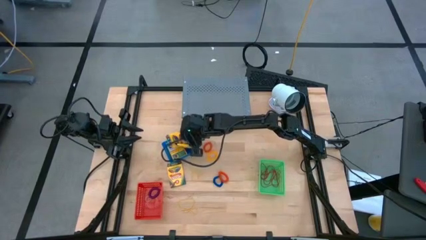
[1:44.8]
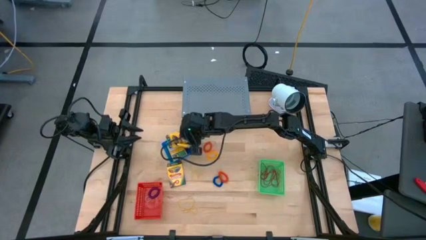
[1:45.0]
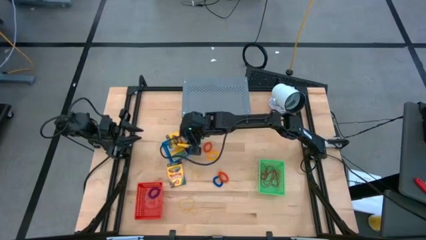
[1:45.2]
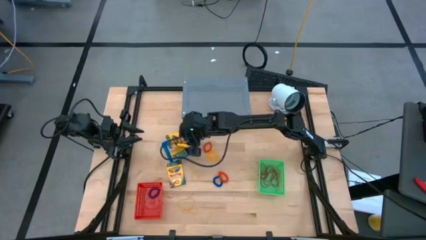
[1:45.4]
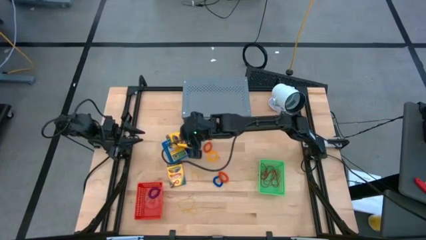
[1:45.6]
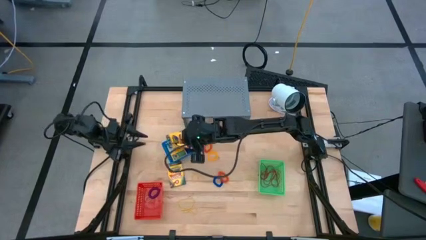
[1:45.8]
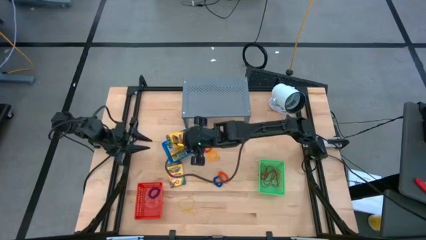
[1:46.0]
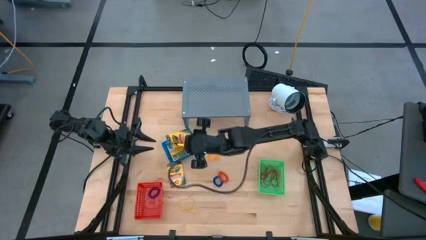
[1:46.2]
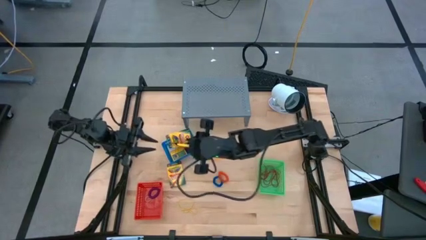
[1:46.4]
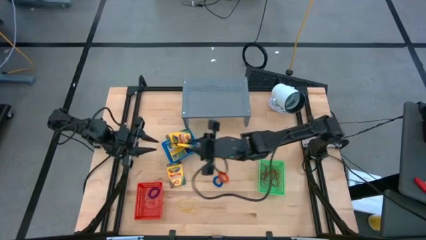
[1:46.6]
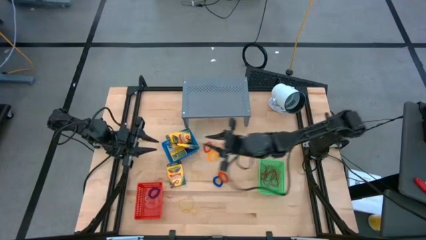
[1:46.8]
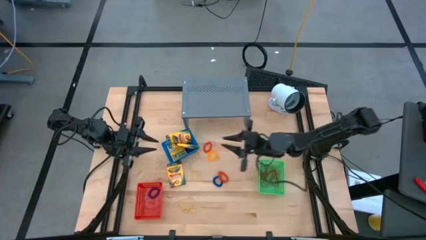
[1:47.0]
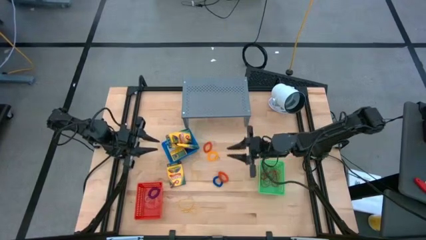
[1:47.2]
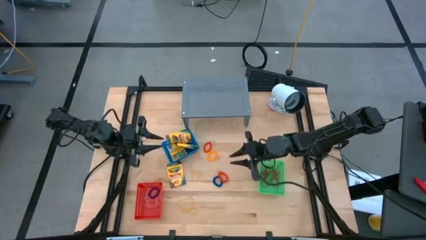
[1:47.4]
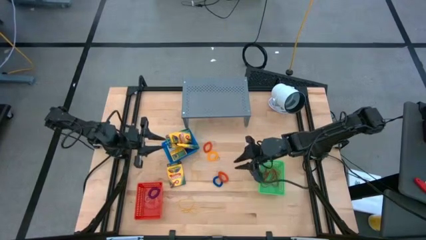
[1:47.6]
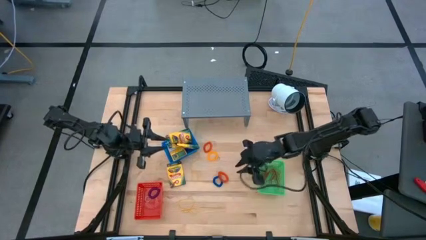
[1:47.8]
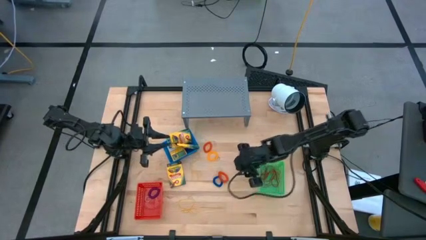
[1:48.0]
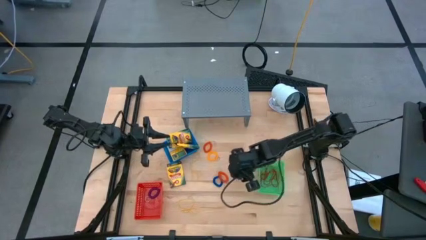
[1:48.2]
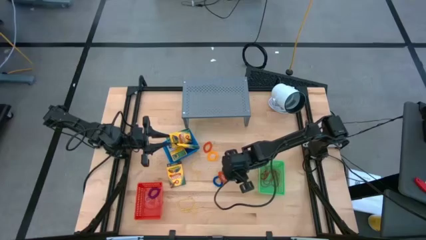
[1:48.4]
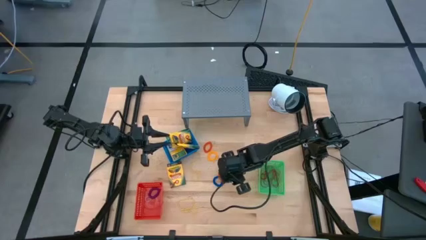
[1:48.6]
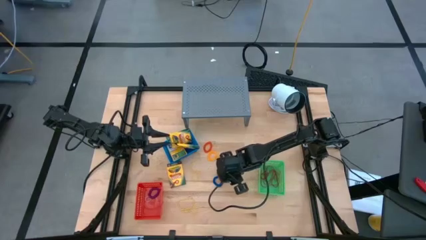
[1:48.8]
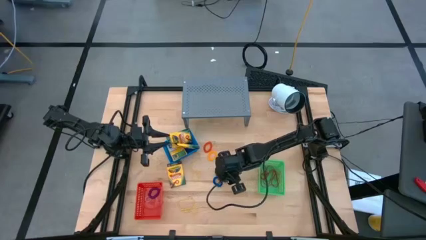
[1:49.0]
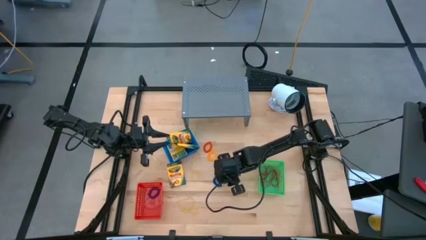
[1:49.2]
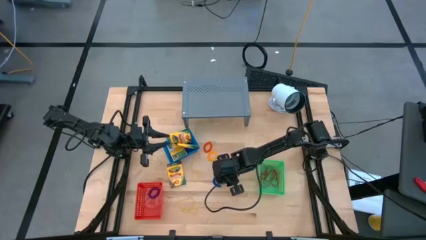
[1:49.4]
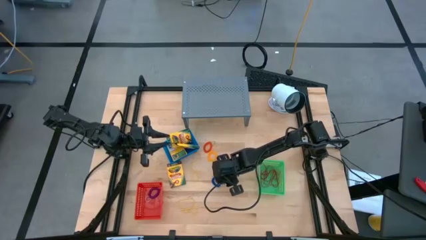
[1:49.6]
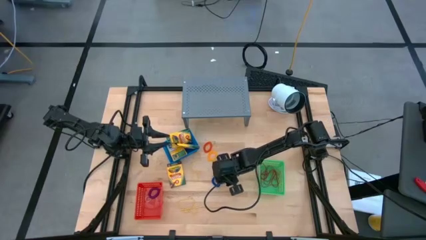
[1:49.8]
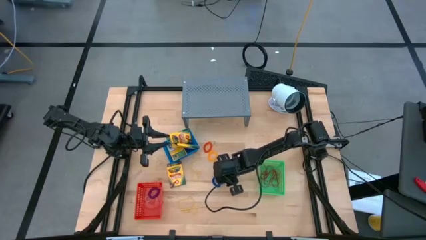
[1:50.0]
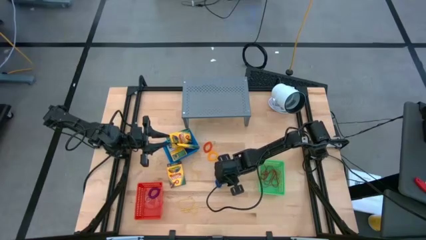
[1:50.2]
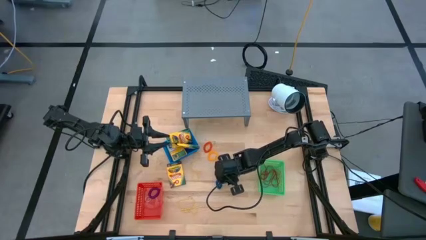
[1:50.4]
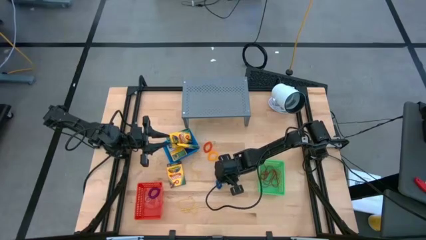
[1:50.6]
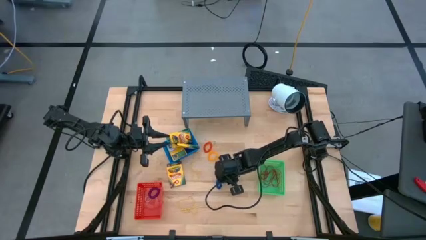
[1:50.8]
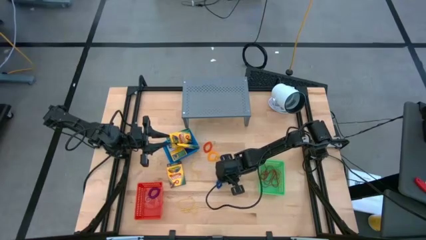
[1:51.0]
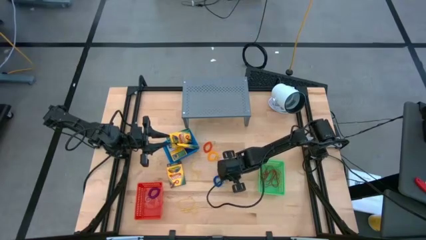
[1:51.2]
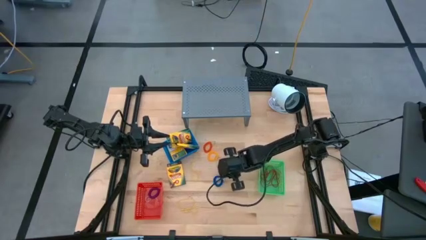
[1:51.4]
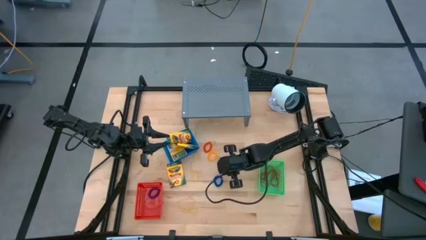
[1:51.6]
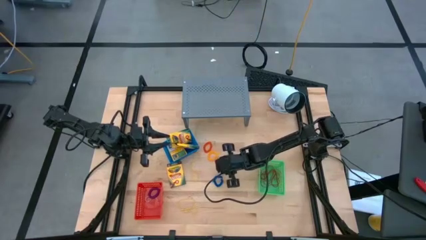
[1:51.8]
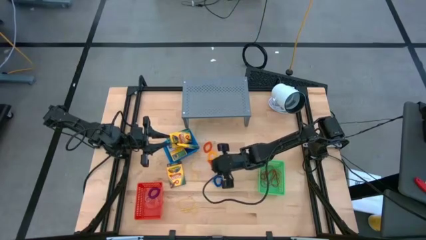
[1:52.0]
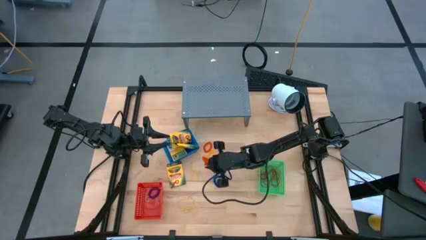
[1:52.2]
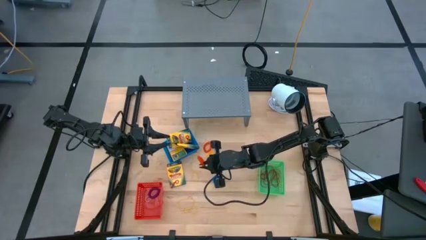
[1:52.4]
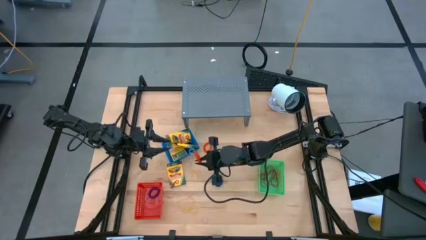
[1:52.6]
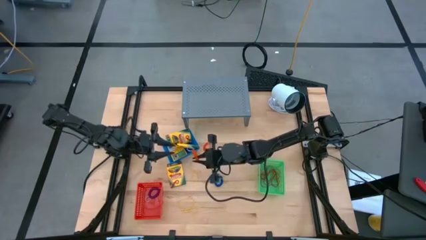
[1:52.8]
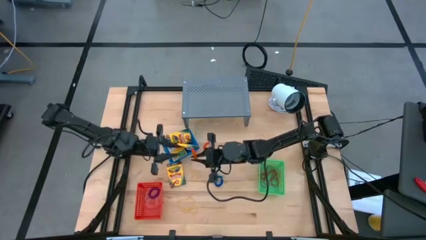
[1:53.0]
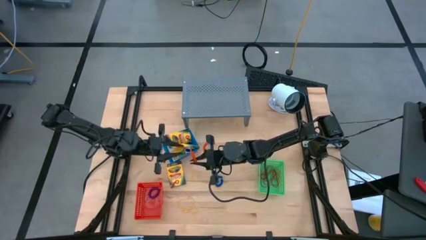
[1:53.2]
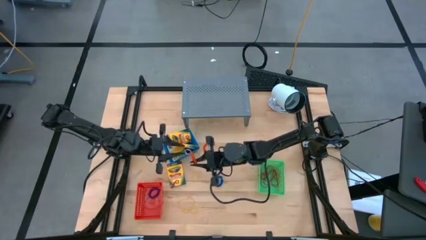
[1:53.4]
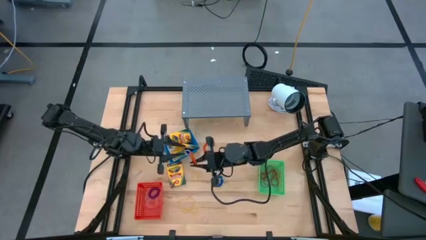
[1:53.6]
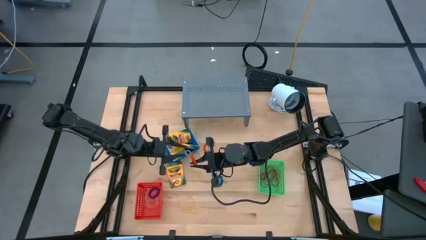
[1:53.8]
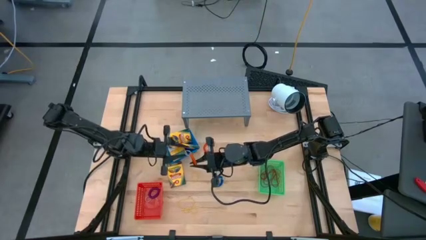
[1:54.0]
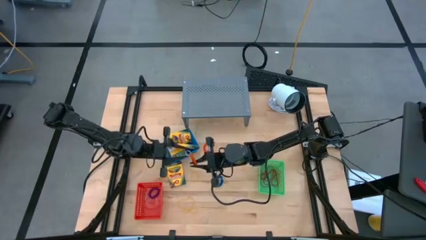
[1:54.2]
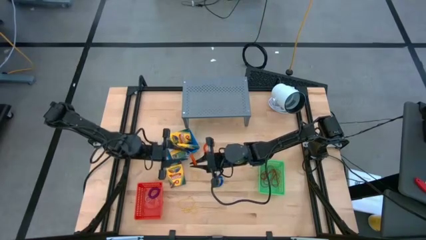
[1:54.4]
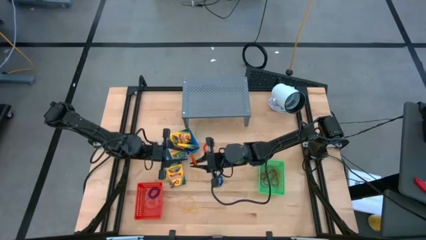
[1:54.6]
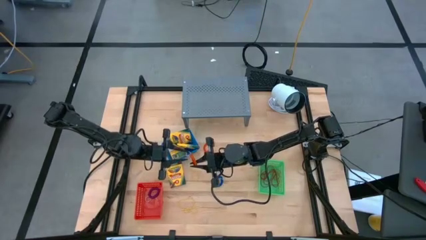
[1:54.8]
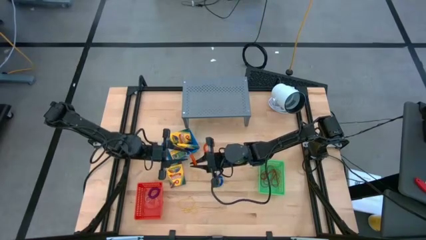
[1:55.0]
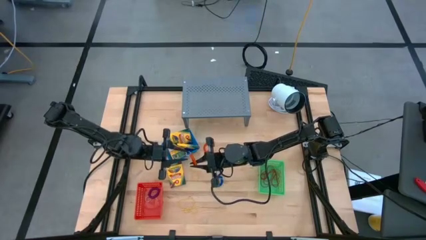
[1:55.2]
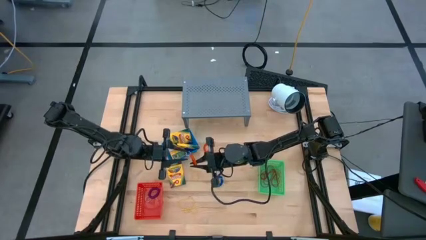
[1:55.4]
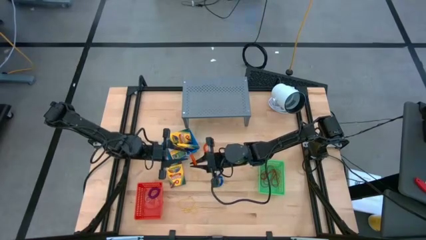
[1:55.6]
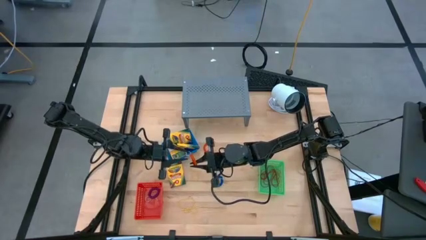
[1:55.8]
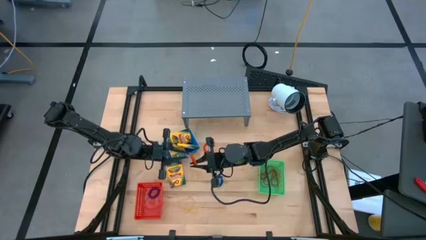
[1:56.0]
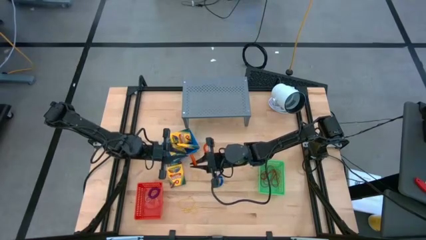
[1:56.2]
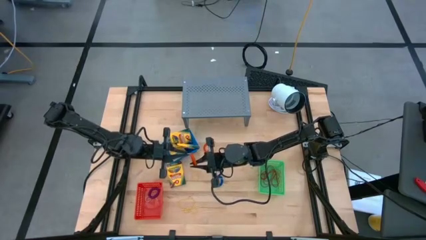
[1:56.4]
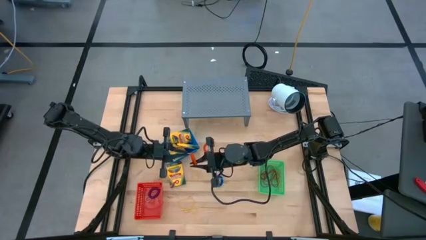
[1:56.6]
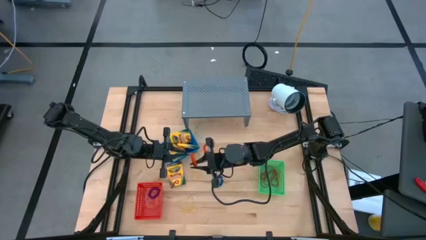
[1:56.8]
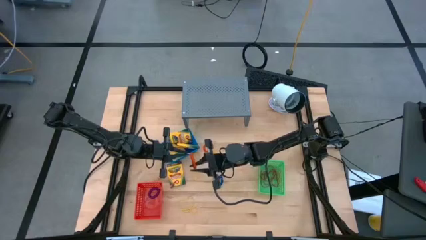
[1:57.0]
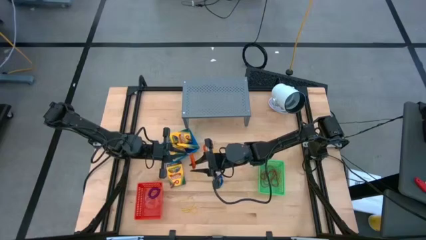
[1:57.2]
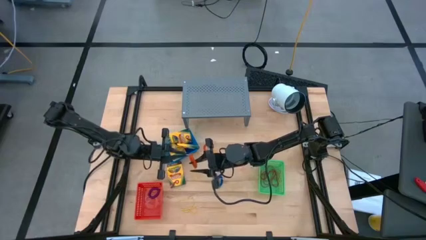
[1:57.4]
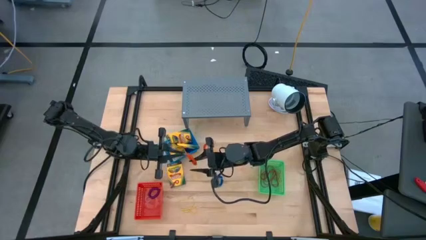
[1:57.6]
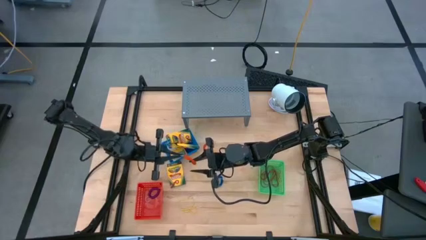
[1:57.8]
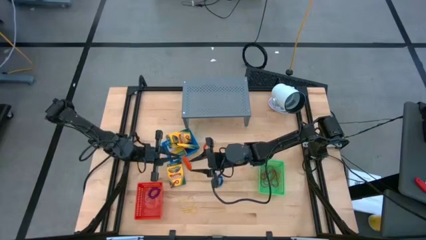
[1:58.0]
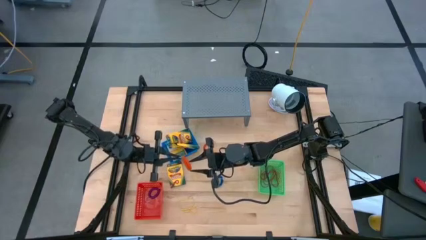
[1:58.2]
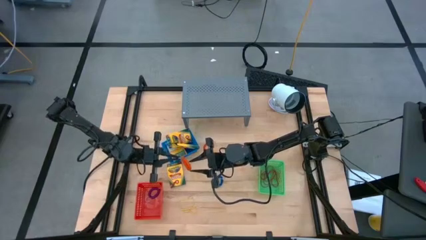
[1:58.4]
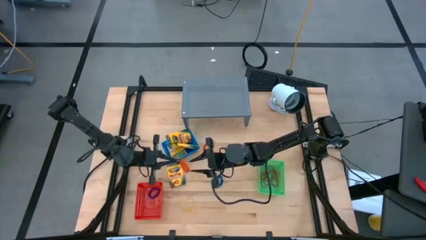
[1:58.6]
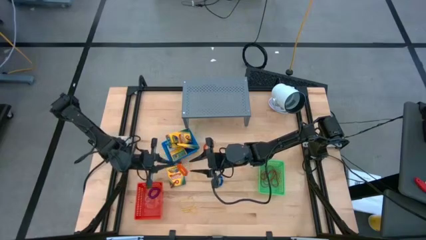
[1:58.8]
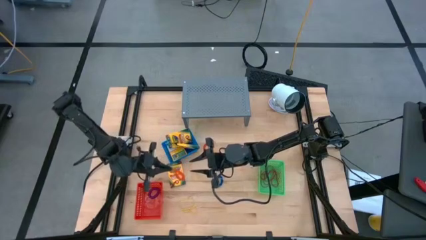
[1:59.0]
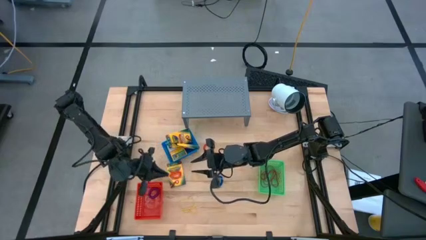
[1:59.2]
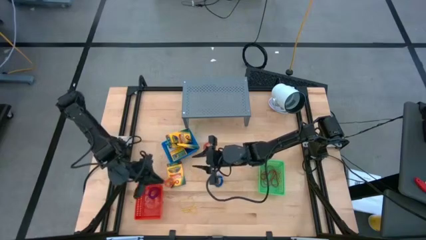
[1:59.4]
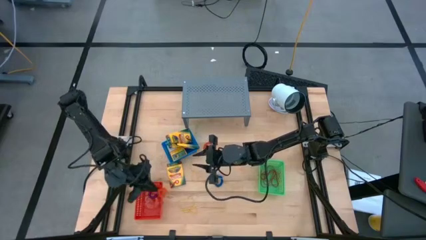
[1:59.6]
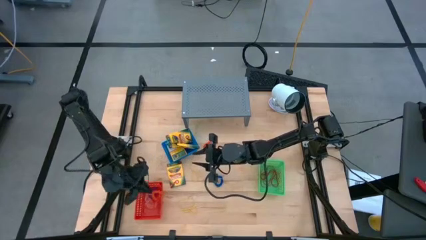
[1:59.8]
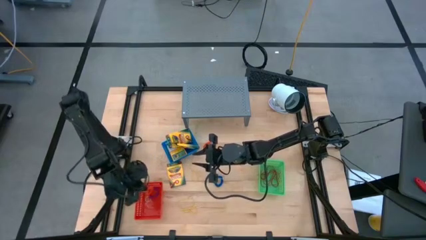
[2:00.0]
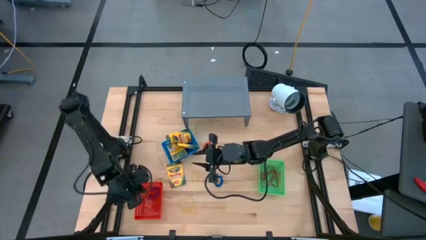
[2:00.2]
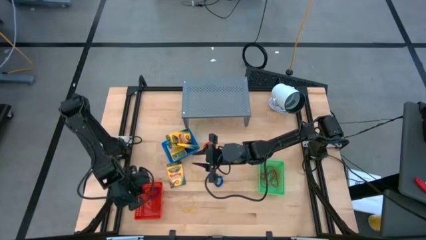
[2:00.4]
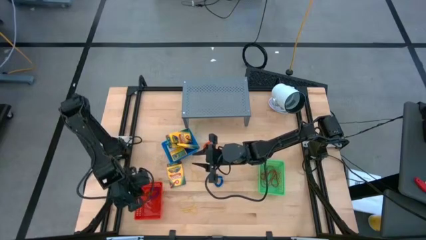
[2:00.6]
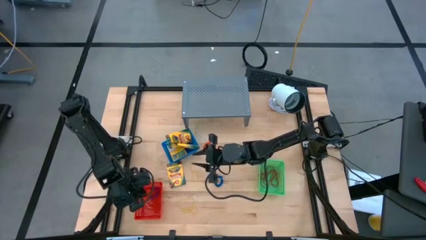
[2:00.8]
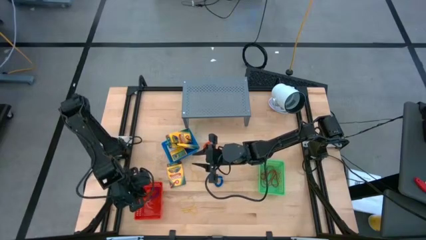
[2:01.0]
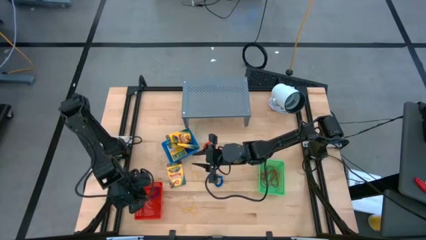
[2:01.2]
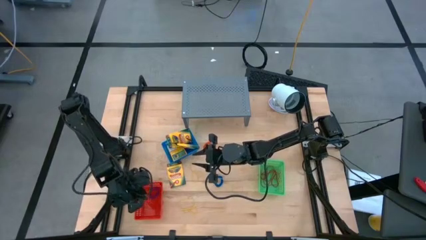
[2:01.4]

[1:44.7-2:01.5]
Task: Pick & Place Office Desk Supplies
Put the orange spiral keychain into the red bin
